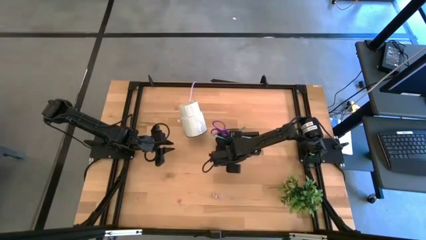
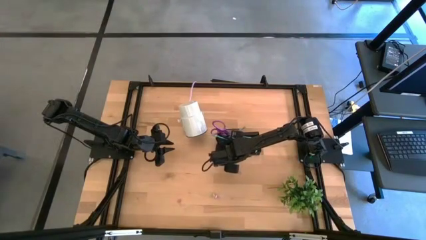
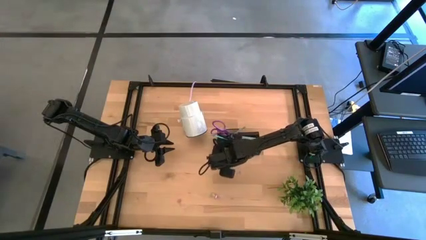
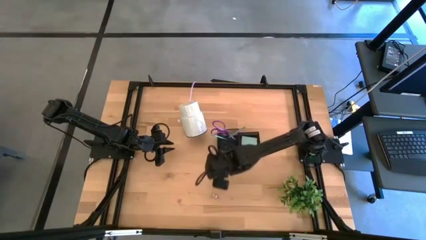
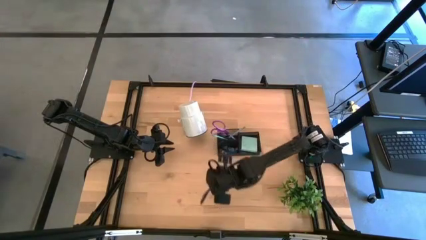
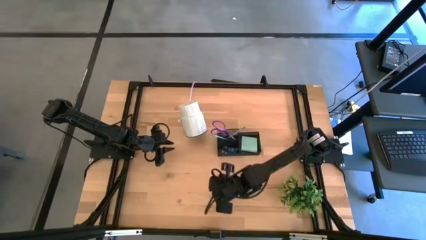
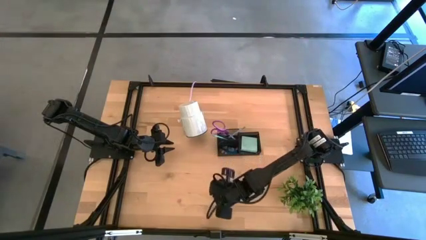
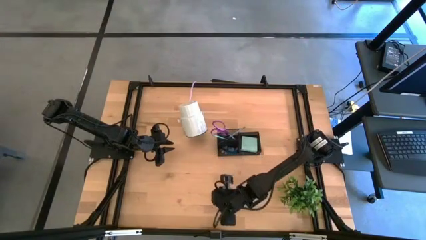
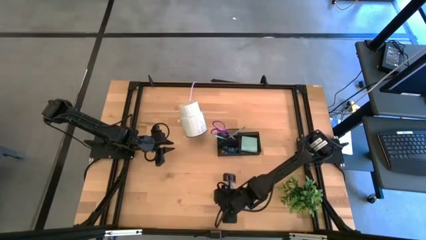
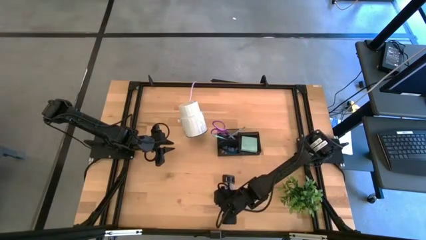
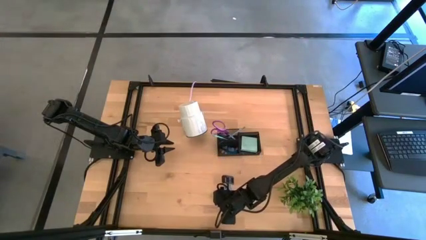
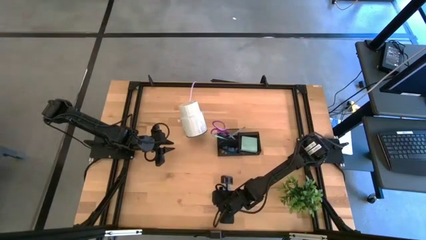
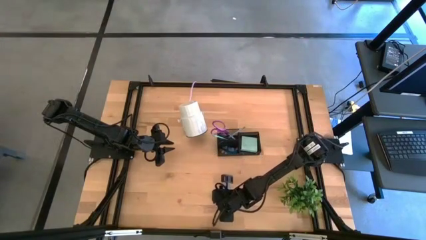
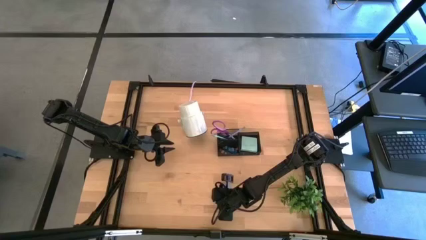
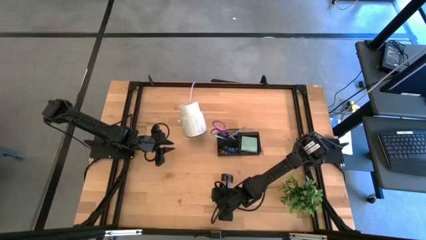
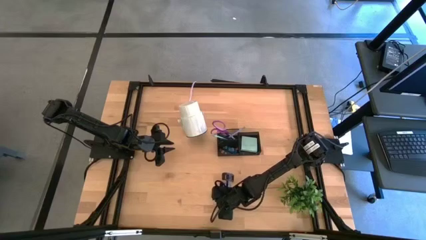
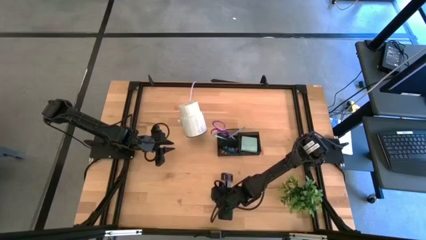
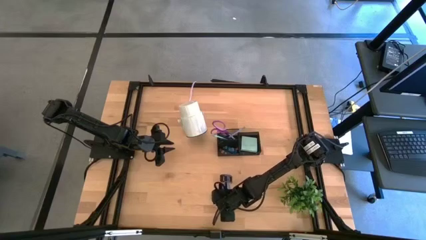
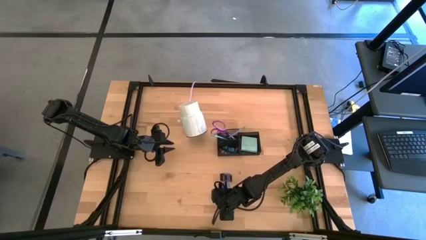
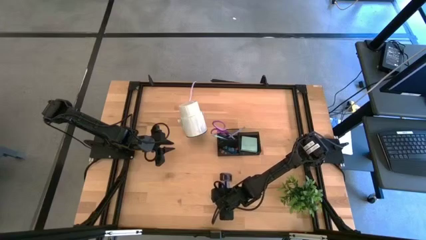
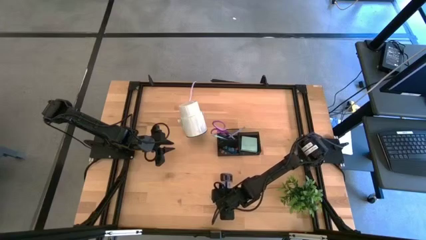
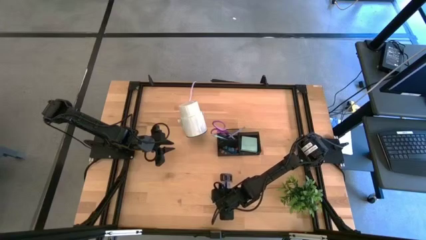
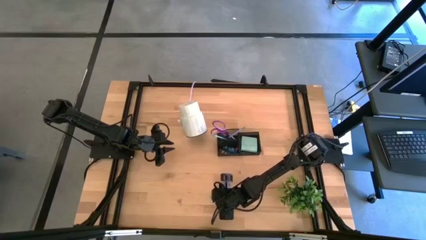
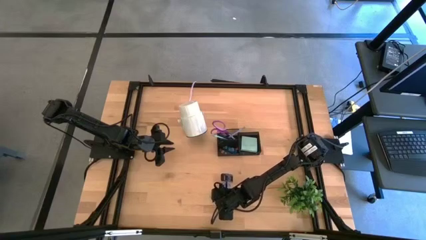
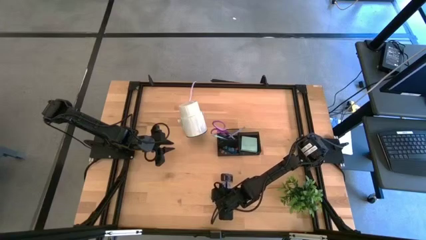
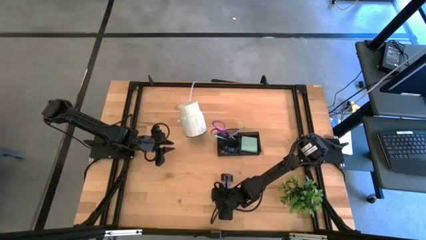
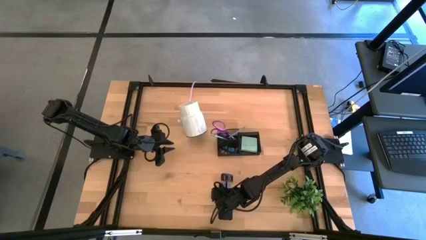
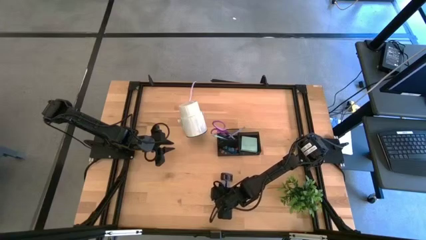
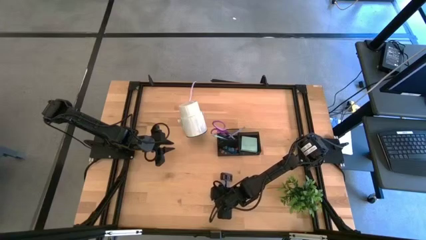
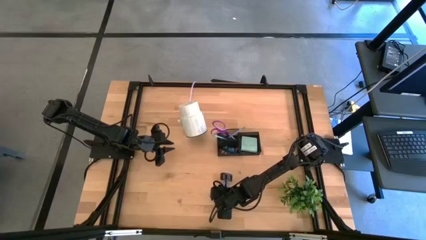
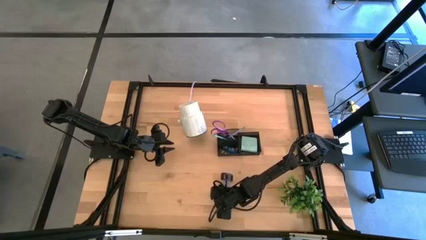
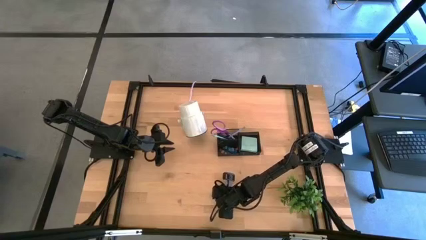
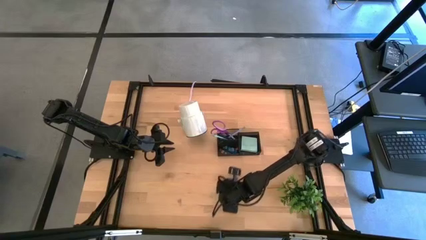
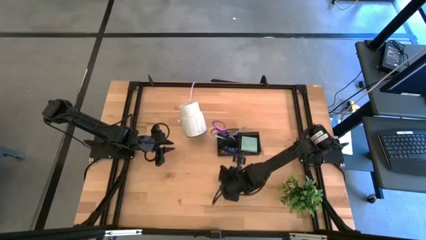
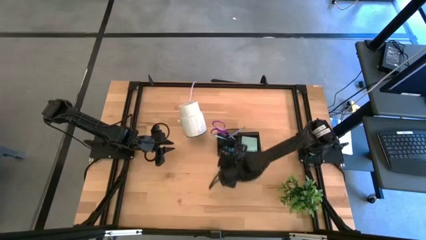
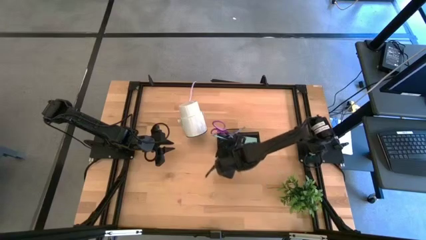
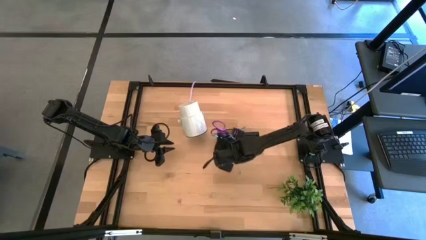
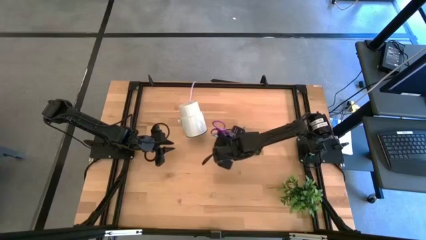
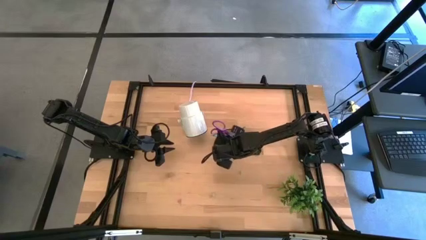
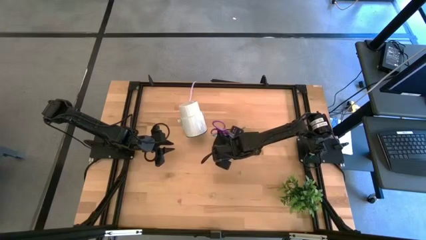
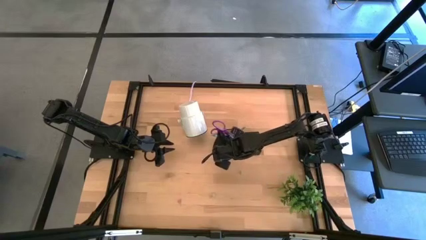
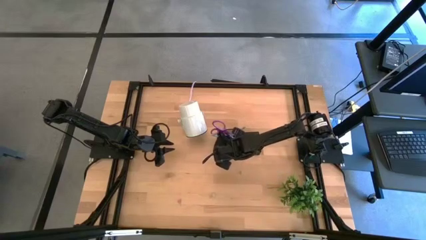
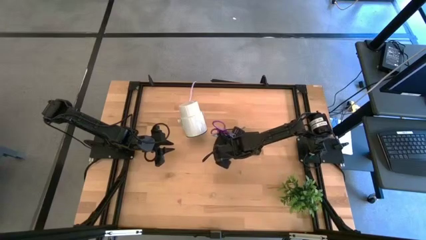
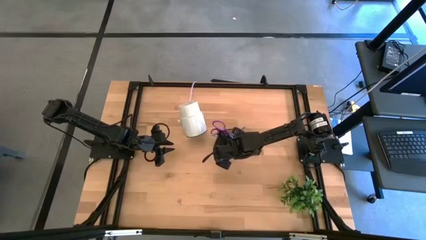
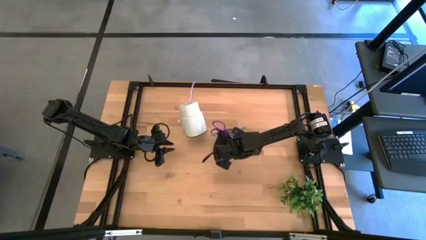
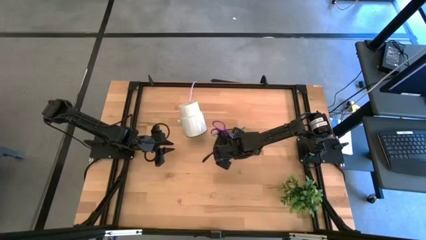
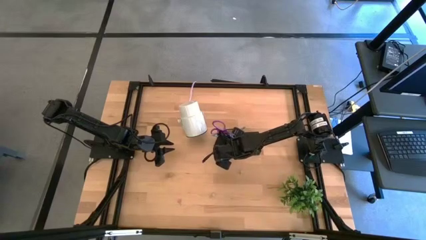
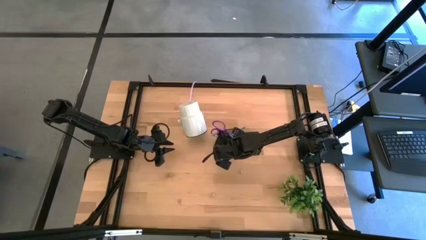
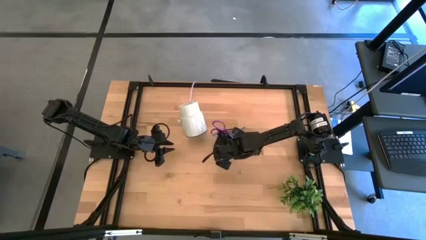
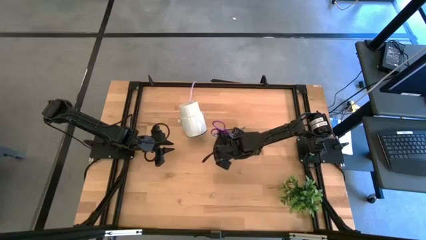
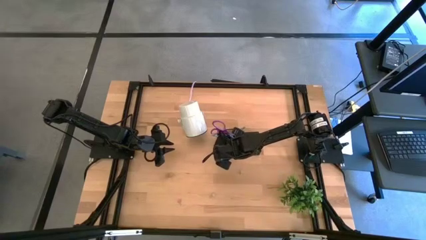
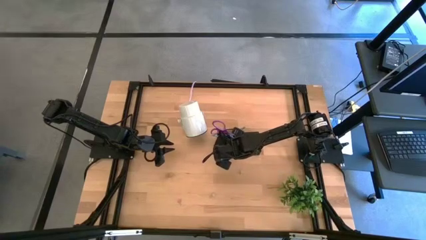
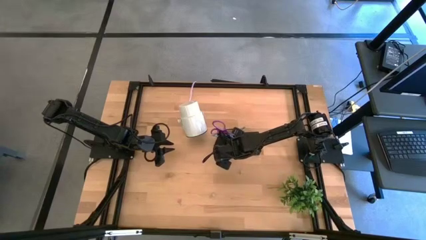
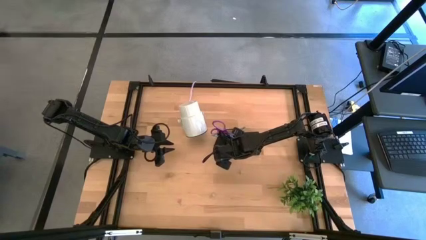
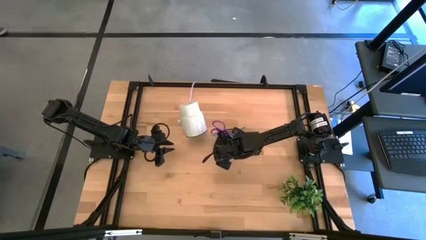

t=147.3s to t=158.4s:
Task: Pick and place office supplies into organizer
Put the pink binder clip into the black desk organizer

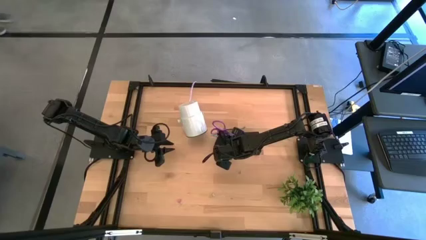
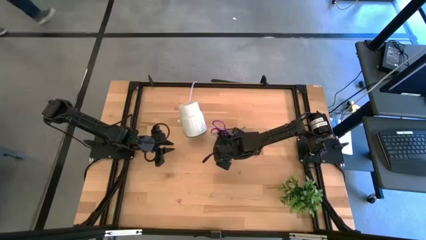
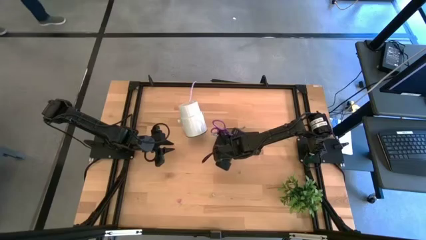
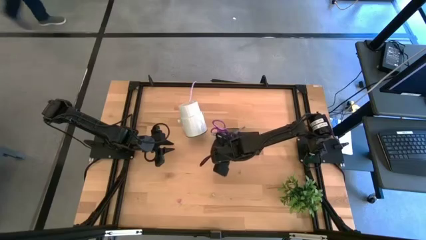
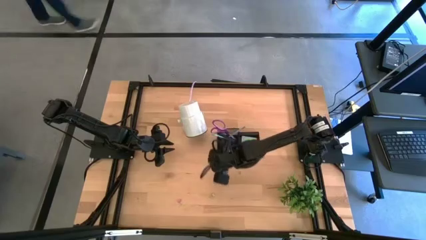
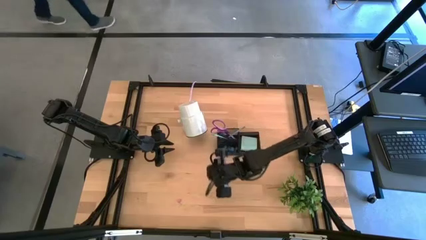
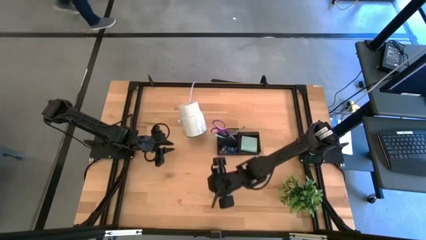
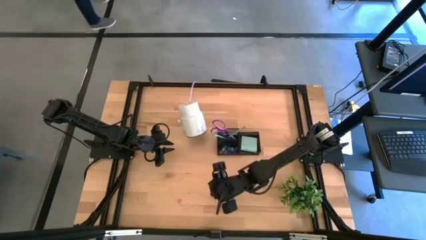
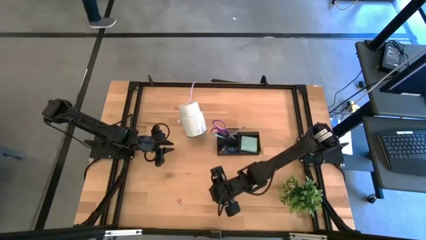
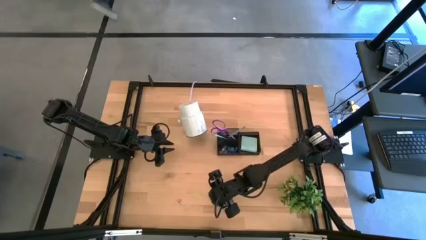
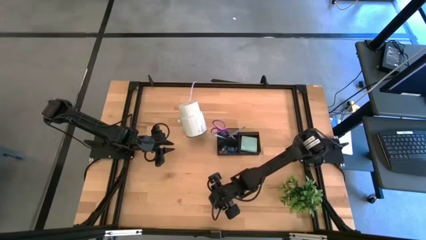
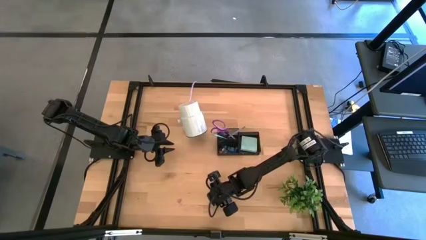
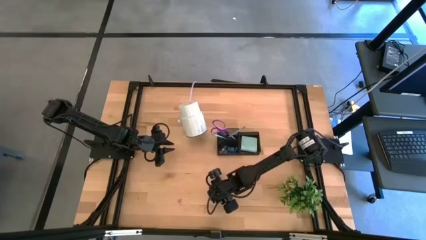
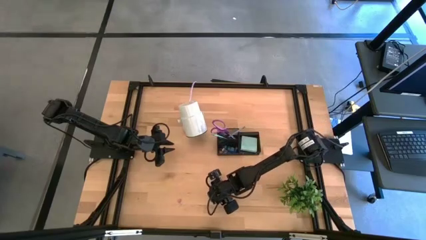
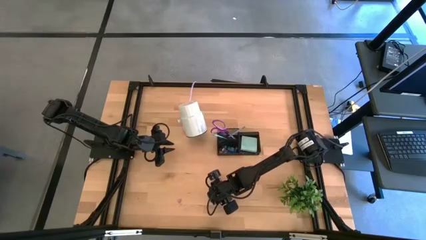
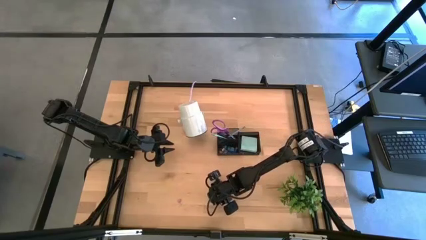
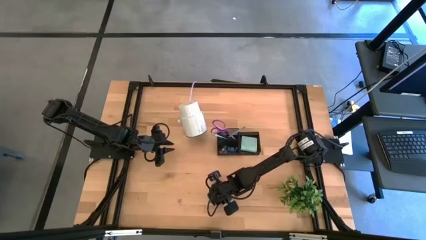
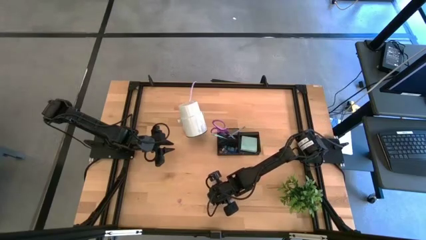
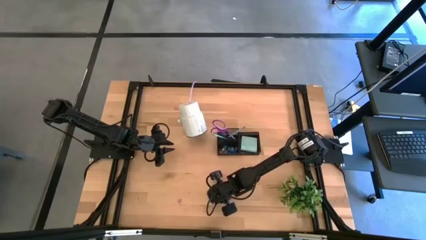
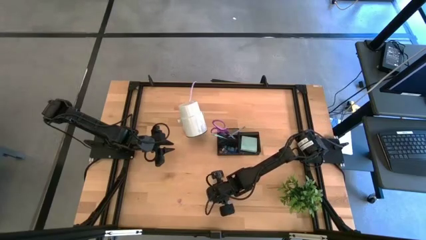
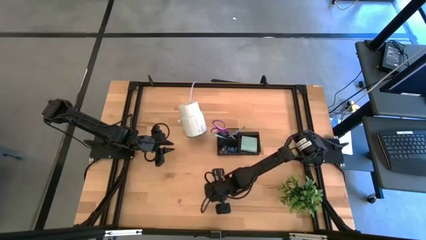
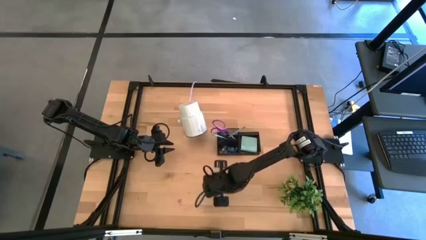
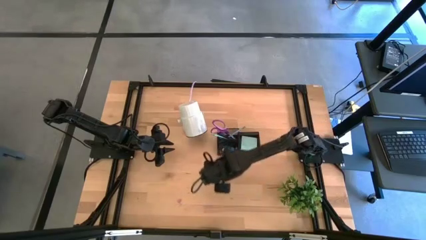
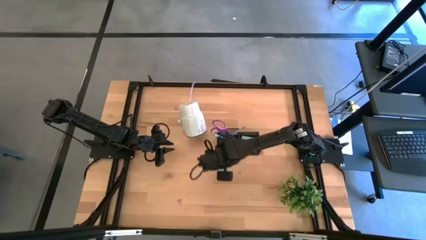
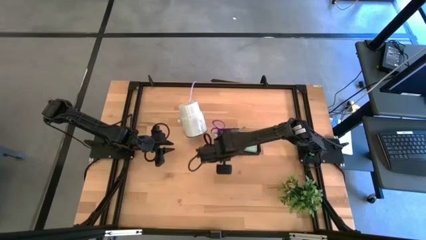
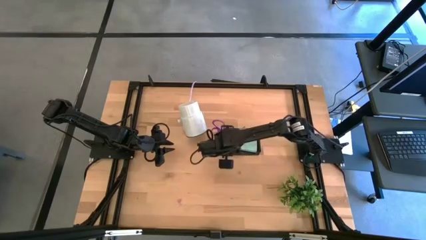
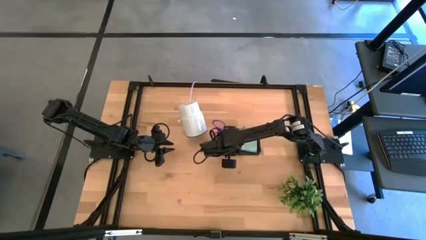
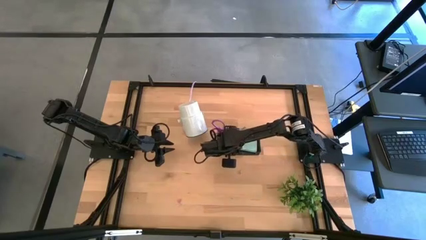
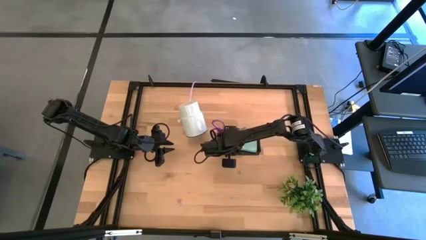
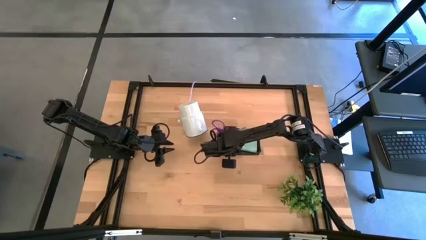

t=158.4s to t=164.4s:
Put the yellow binder clip into the black desk organizer
